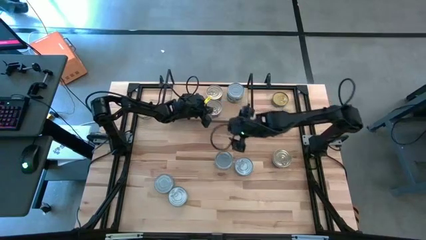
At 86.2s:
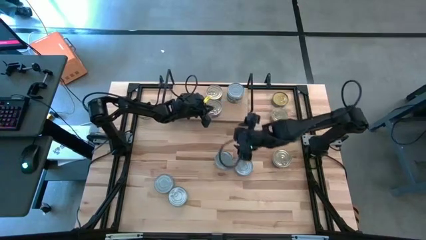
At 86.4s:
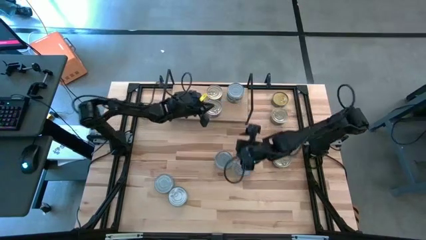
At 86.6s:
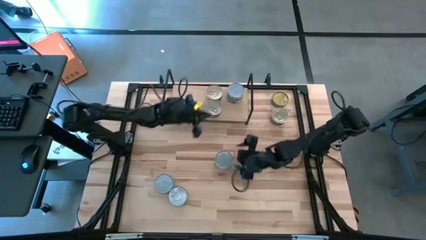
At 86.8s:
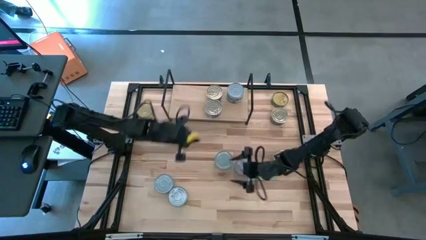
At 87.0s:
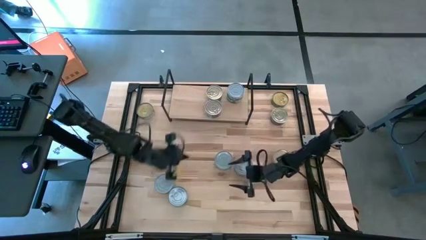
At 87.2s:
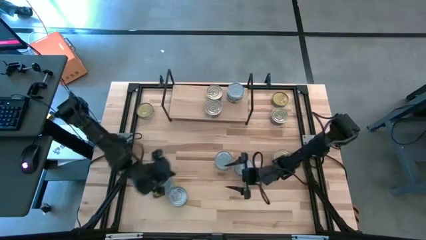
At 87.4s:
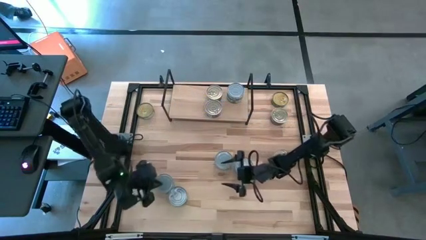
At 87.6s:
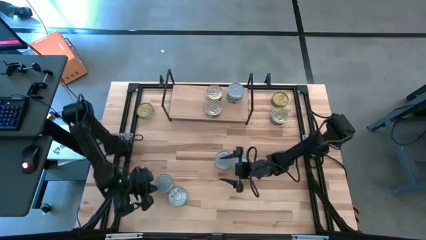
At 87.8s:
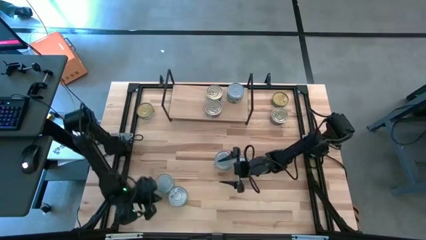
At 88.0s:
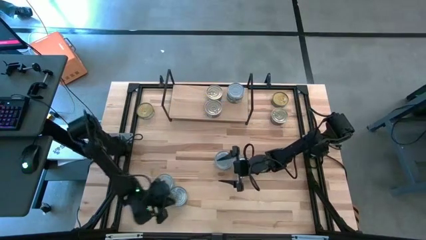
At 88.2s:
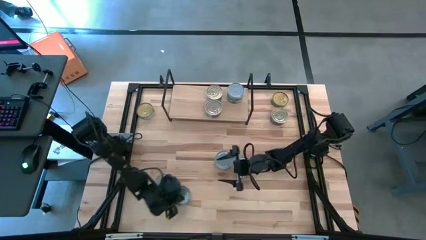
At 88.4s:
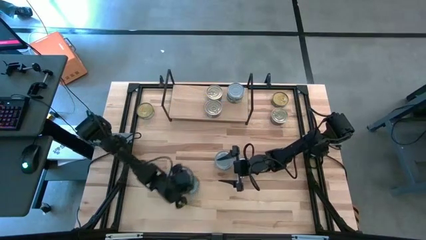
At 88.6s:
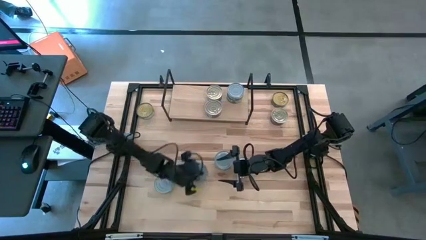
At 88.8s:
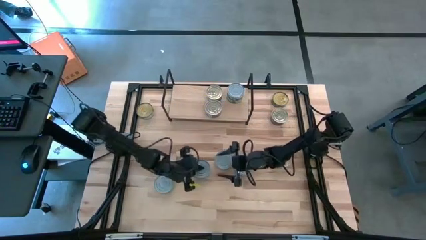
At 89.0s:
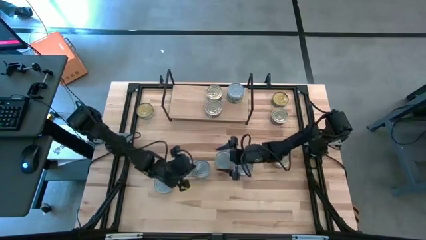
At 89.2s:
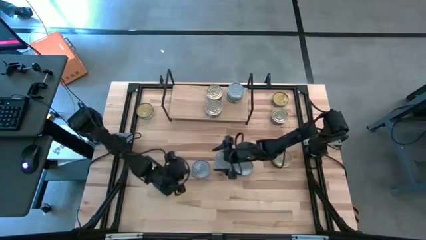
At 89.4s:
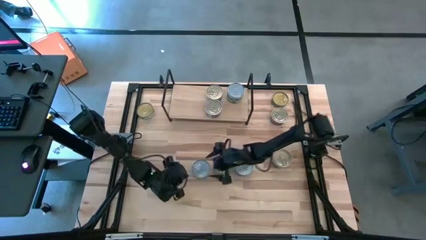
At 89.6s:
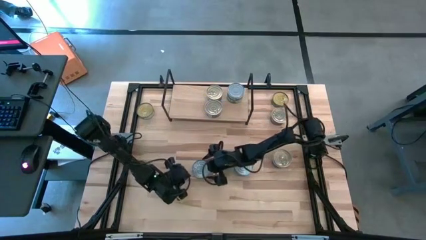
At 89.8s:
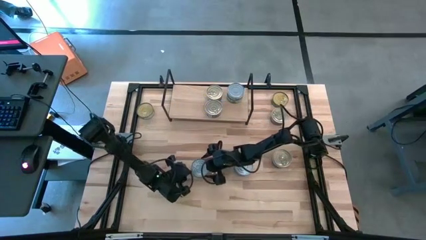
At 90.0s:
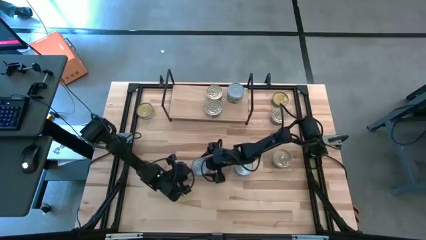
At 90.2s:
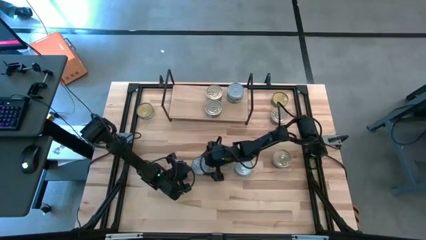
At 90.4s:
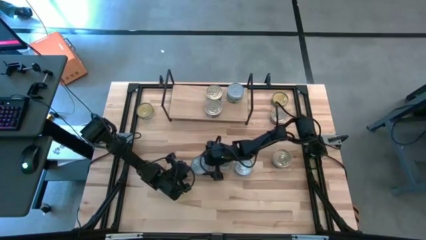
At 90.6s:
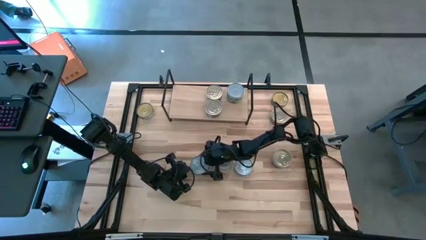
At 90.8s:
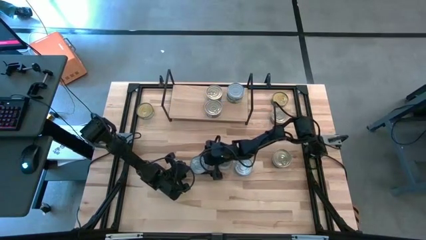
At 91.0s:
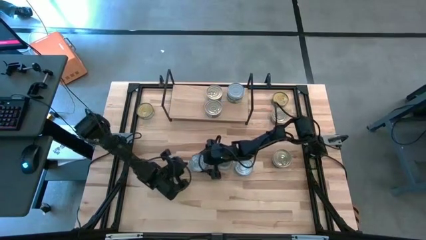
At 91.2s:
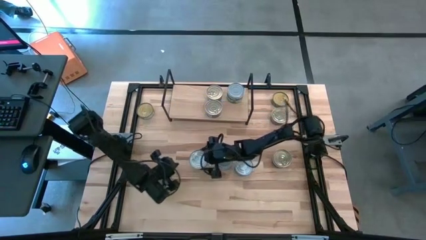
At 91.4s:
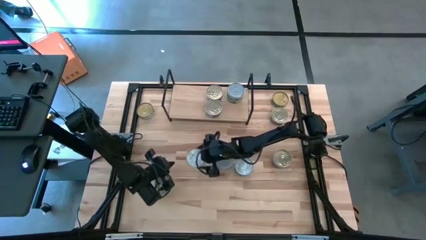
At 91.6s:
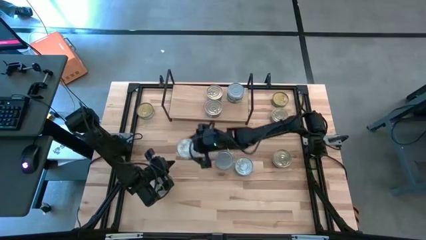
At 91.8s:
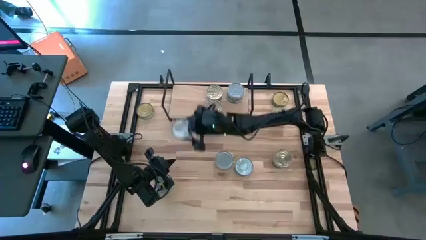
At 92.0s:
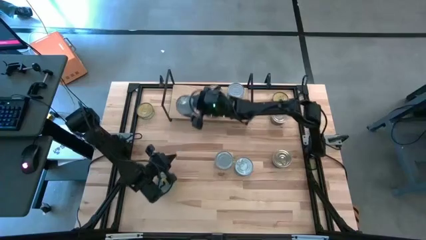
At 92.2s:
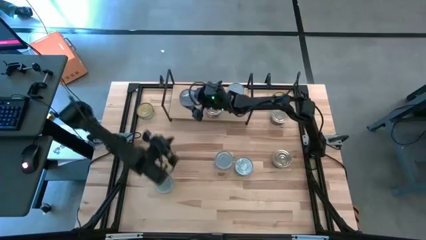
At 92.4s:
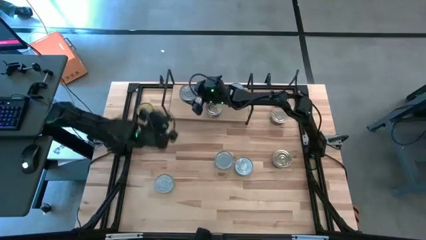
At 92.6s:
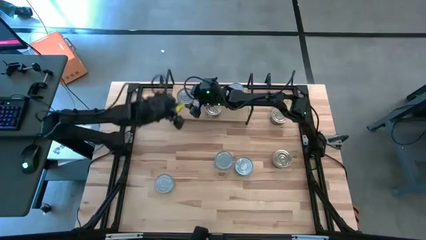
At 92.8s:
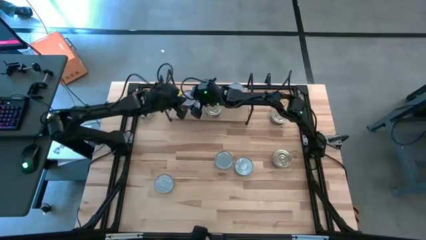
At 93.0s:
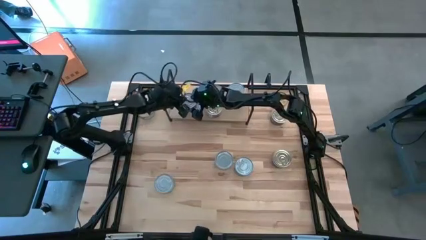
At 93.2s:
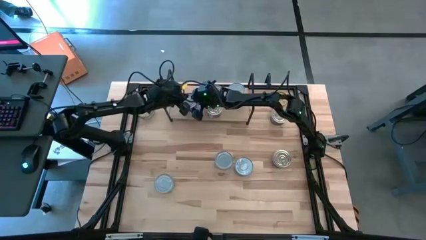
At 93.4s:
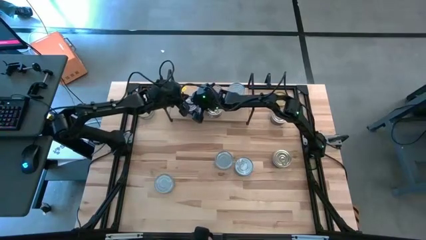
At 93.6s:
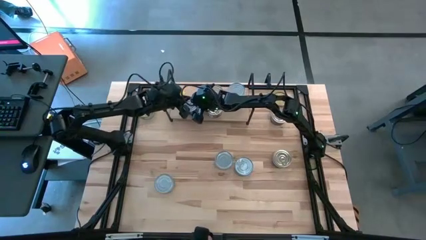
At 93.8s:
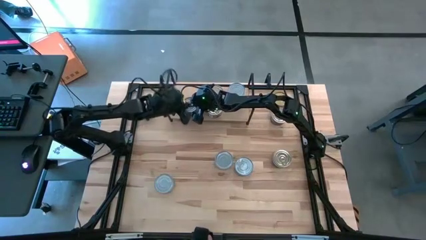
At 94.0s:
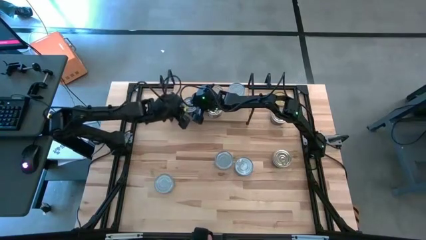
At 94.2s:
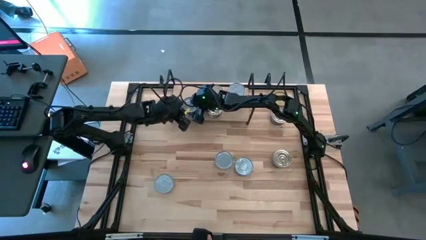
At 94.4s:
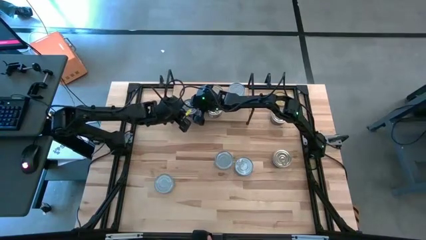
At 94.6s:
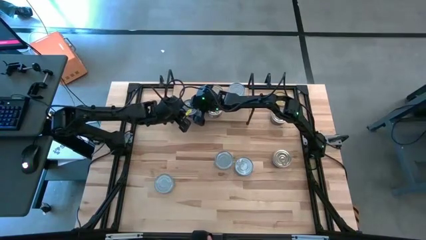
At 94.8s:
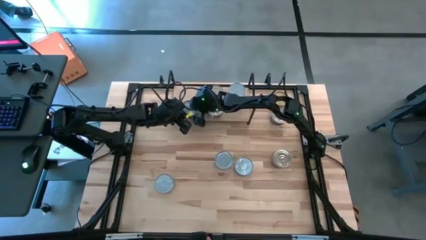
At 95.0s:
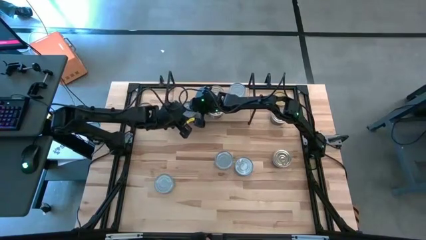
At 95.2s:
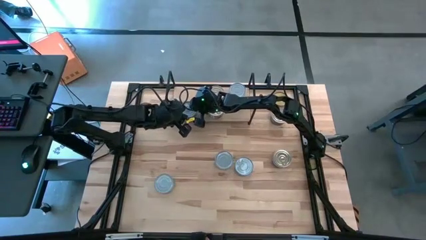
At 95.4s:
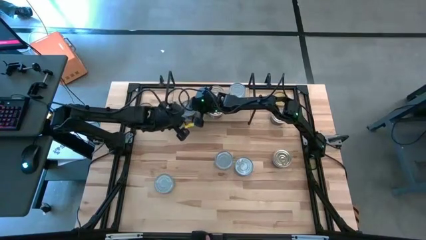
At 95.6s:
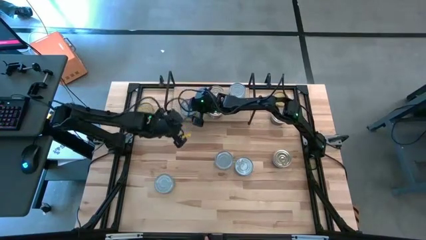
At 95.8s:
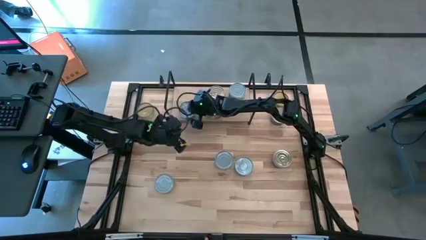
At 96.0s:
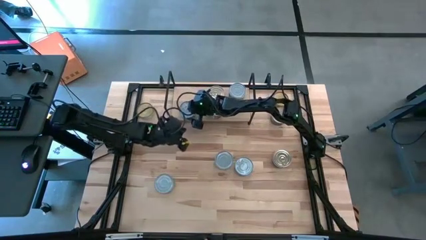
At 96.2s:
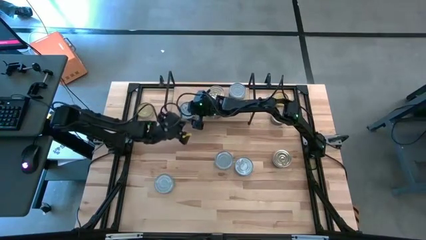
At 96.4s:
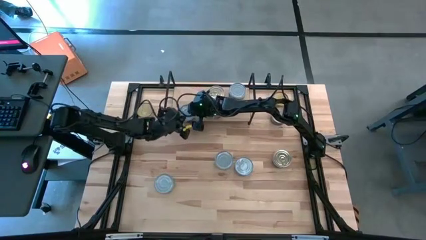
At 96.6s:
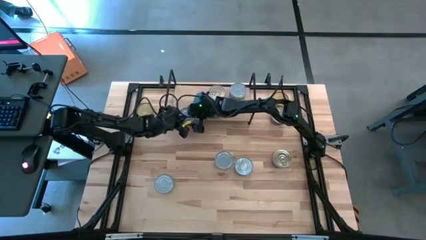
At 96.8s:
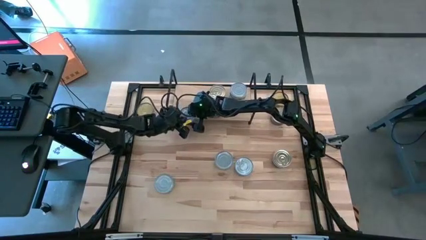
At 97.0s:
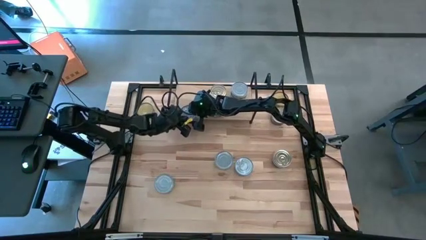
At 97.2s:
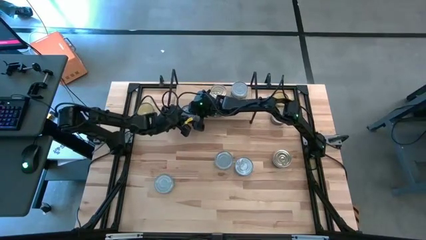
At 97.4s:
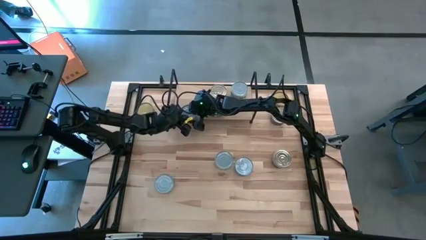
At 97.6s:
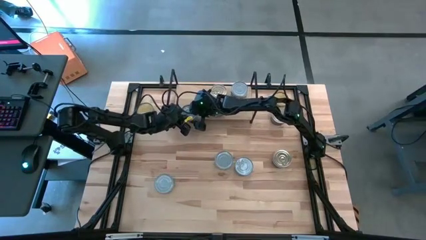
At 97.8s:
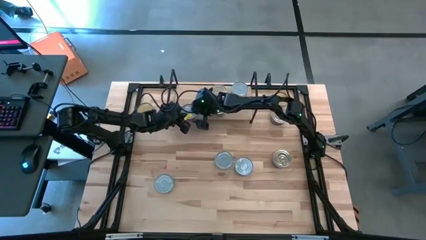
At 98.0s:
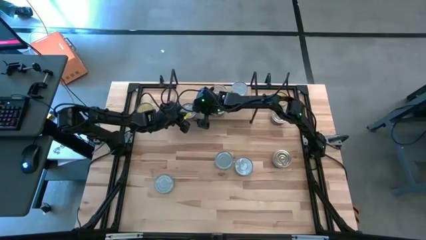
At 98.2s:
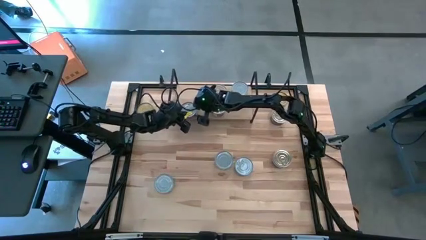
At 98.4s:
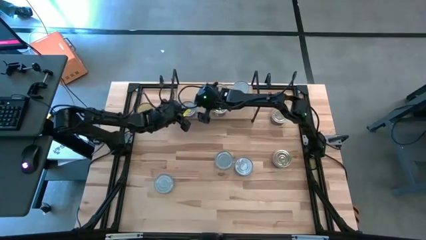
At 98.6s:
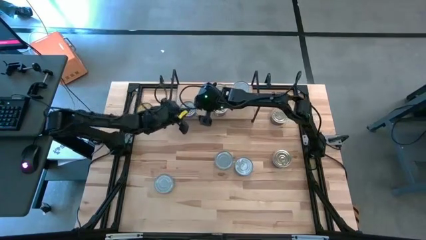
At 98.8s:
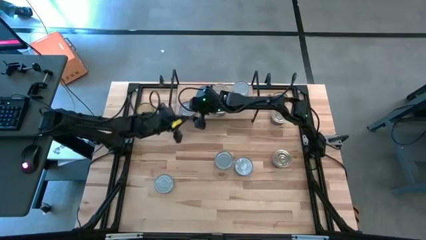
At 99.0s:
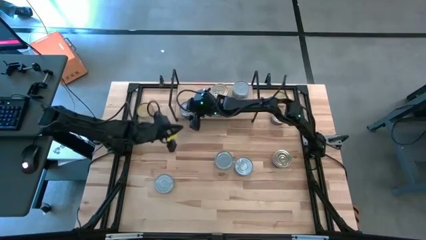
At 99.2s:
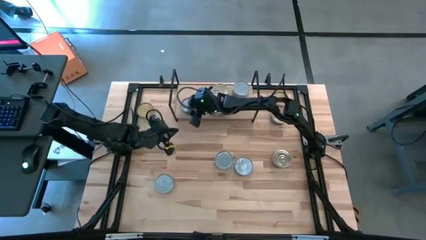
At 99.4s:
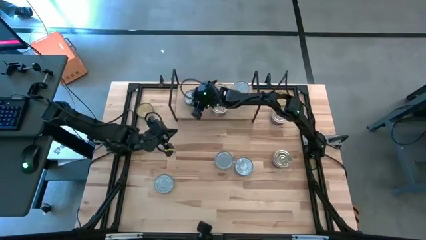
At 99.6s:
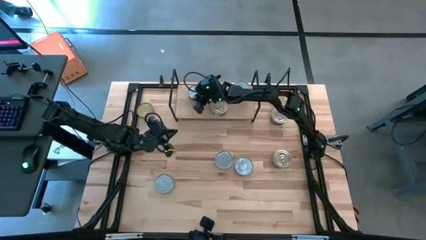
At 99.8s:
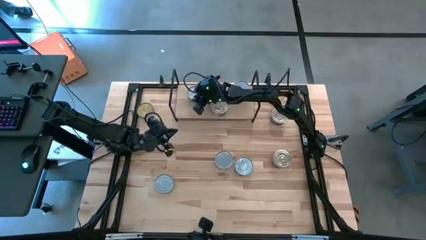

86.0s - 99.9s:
Task: Stack canned seafood by type on shelf
Put the green tuna can on the shelf
